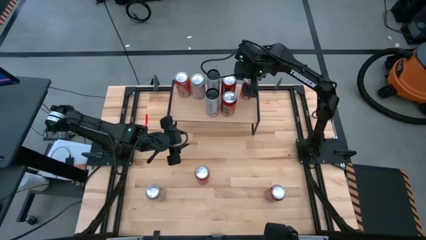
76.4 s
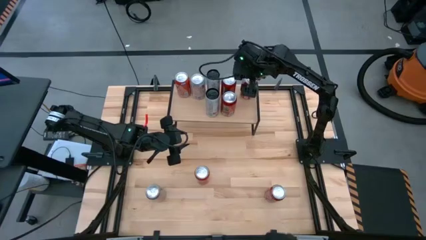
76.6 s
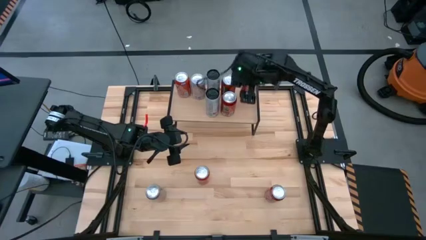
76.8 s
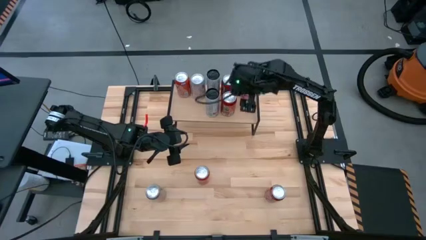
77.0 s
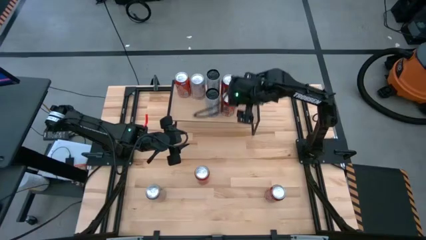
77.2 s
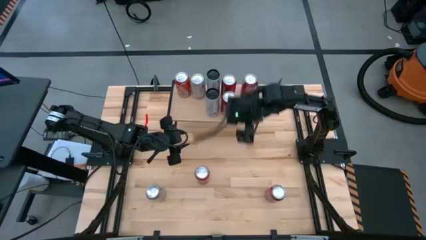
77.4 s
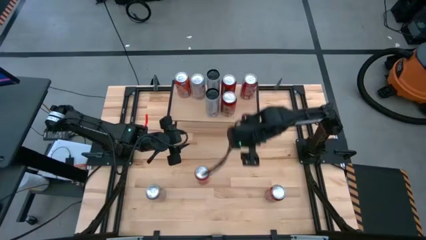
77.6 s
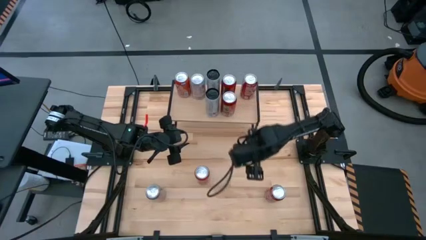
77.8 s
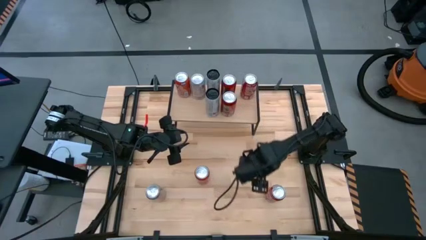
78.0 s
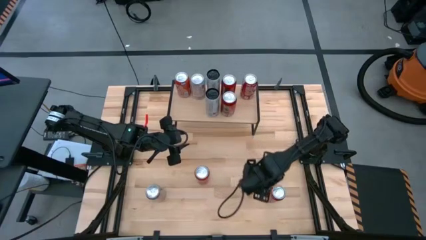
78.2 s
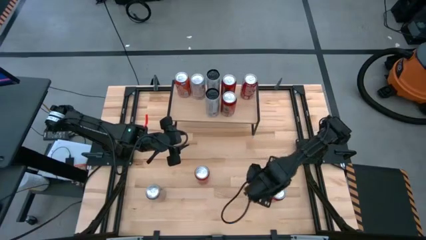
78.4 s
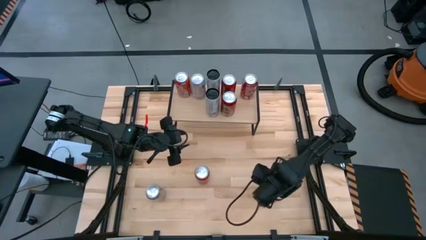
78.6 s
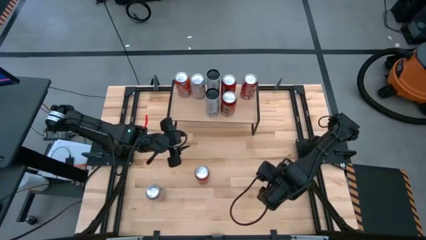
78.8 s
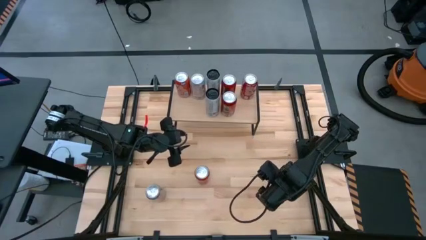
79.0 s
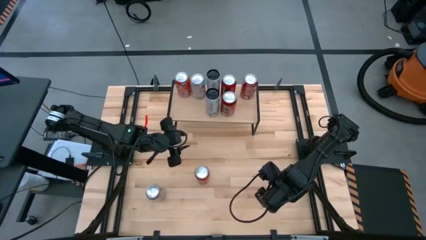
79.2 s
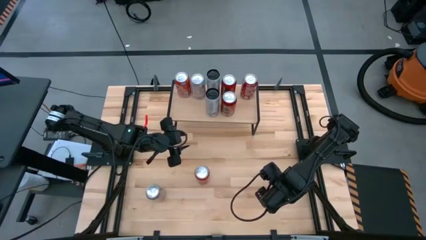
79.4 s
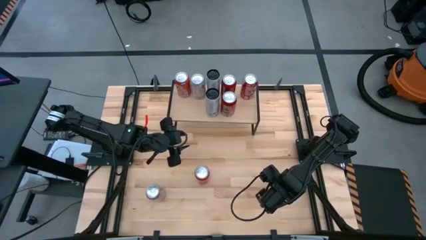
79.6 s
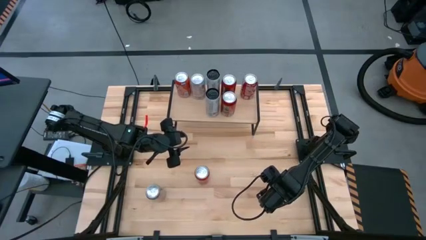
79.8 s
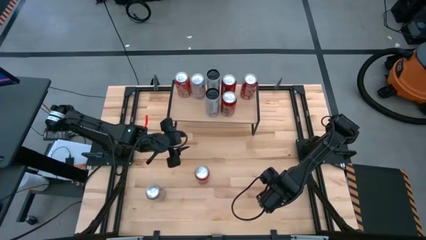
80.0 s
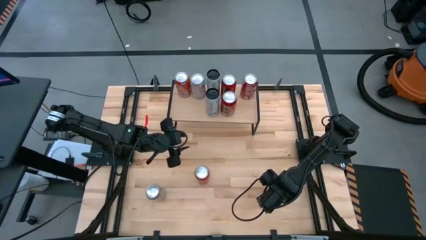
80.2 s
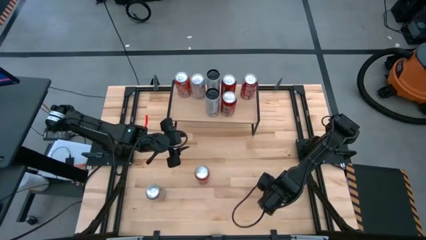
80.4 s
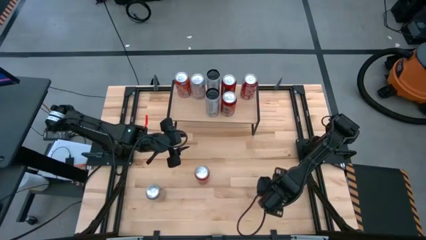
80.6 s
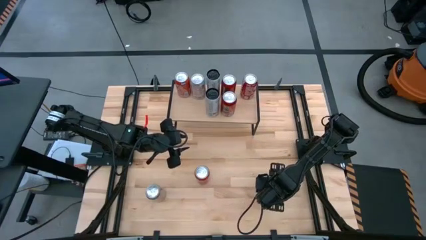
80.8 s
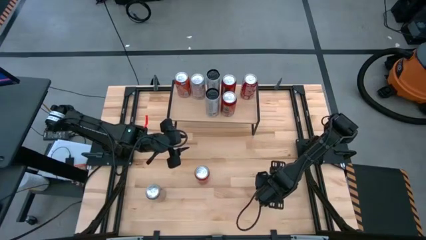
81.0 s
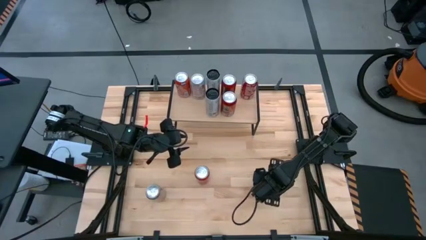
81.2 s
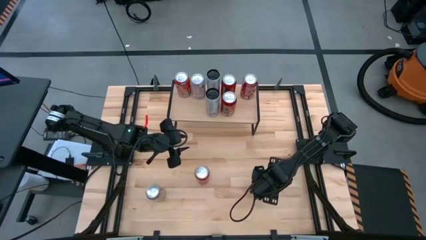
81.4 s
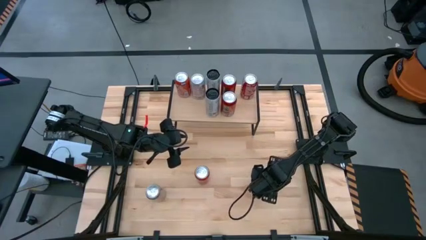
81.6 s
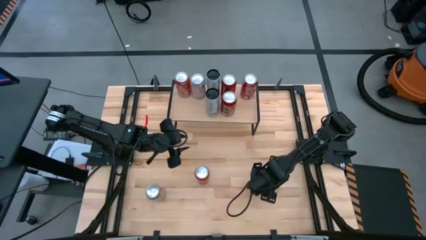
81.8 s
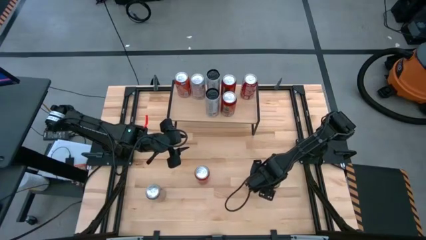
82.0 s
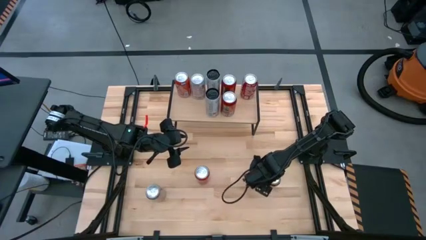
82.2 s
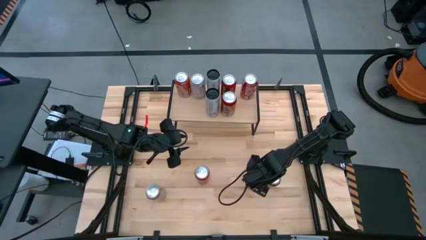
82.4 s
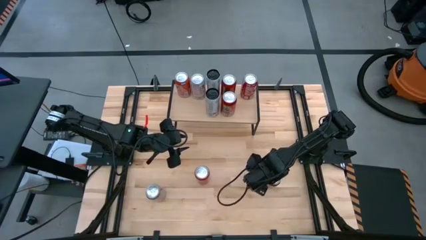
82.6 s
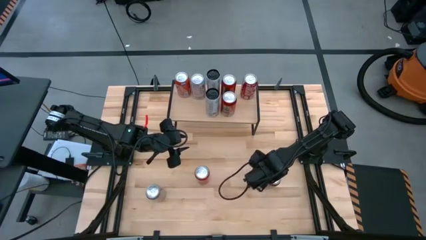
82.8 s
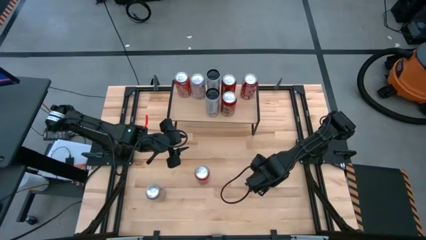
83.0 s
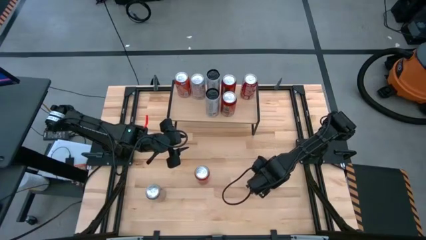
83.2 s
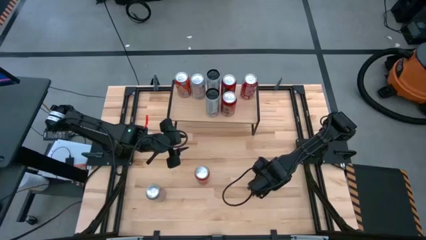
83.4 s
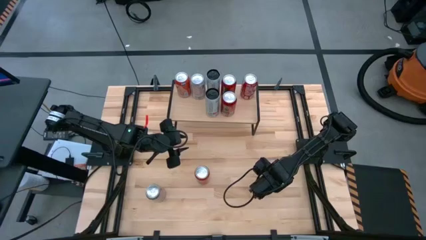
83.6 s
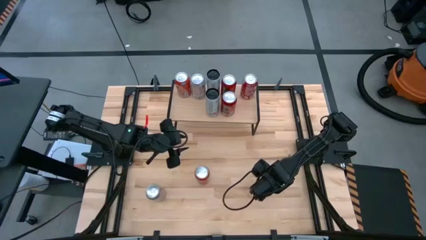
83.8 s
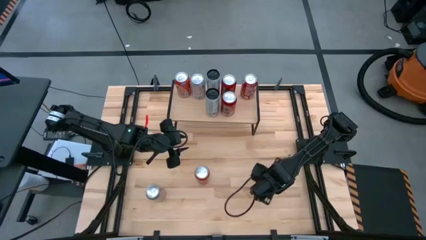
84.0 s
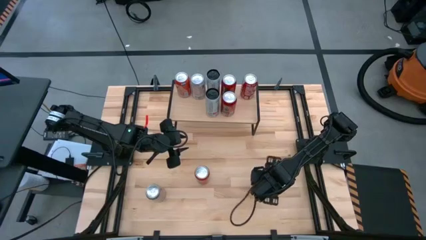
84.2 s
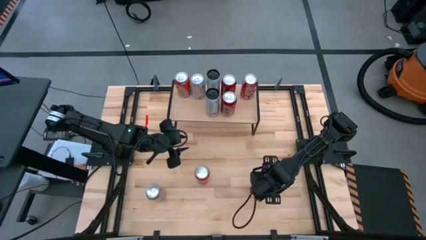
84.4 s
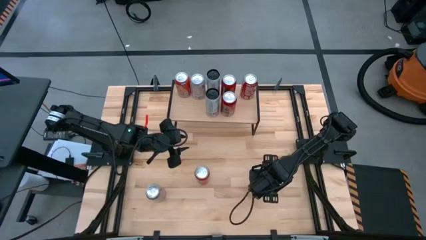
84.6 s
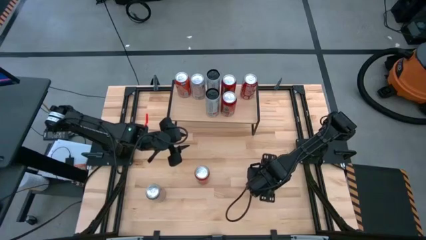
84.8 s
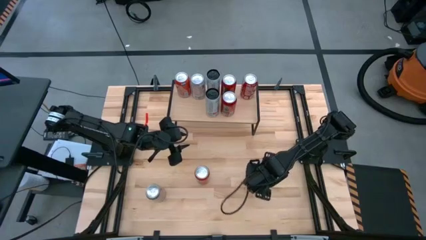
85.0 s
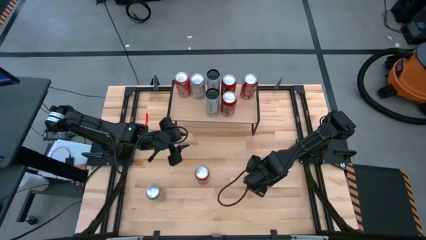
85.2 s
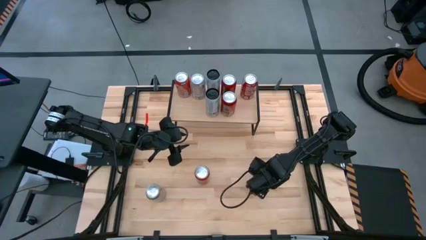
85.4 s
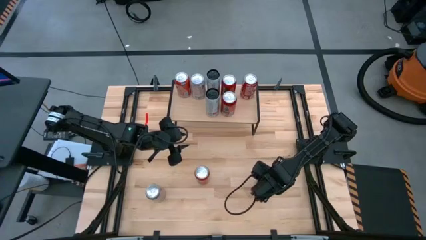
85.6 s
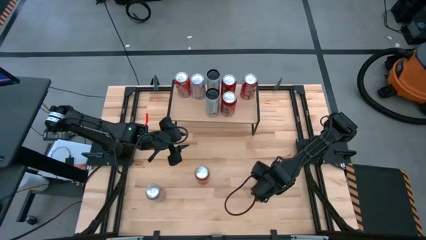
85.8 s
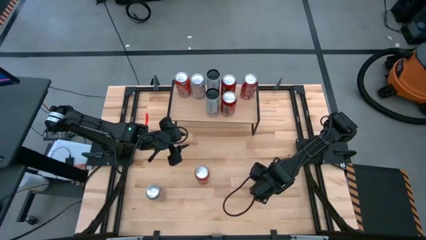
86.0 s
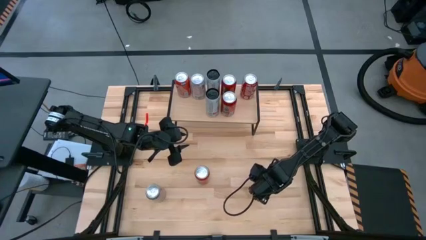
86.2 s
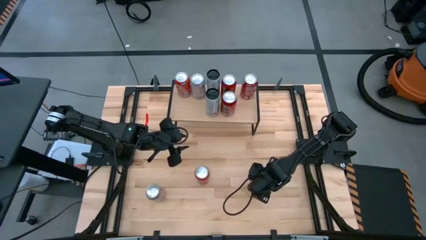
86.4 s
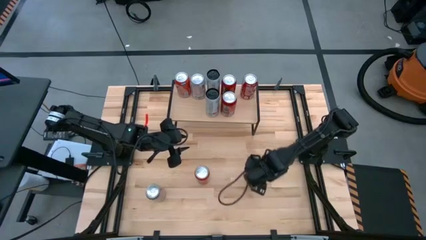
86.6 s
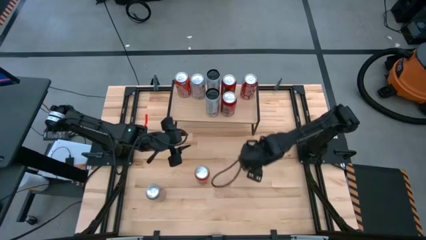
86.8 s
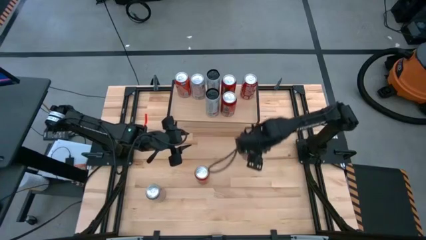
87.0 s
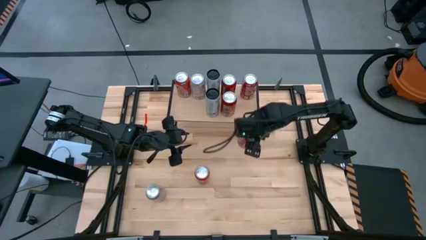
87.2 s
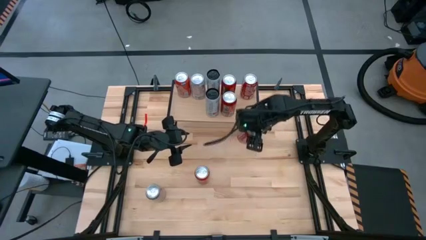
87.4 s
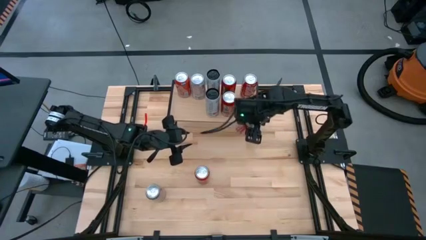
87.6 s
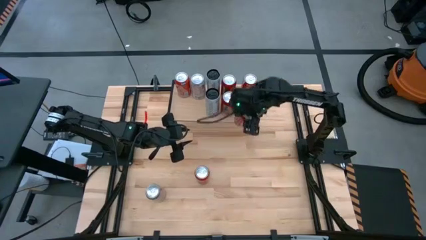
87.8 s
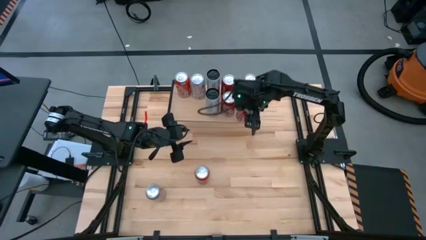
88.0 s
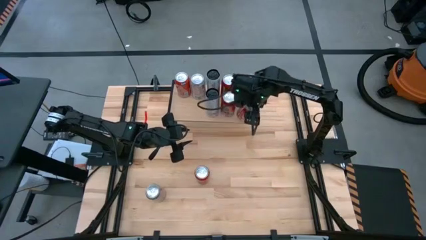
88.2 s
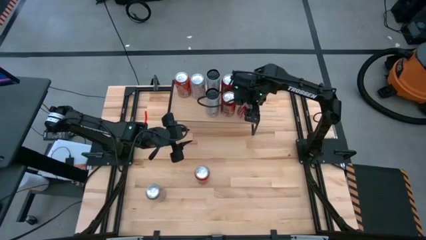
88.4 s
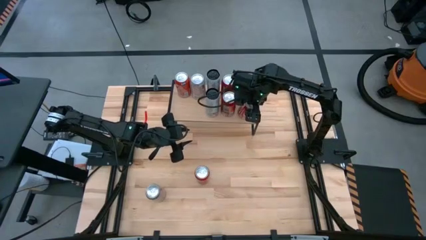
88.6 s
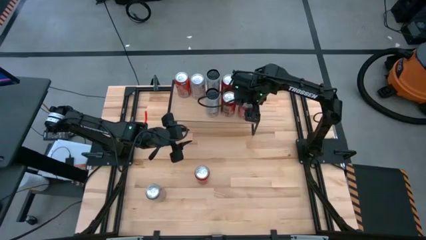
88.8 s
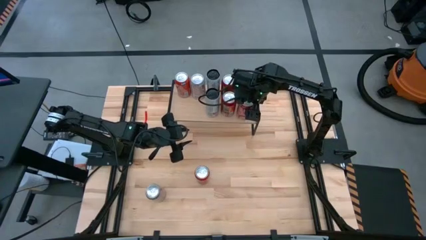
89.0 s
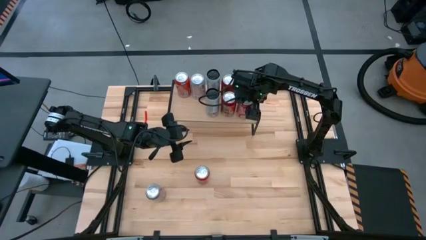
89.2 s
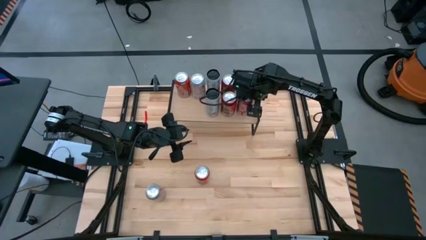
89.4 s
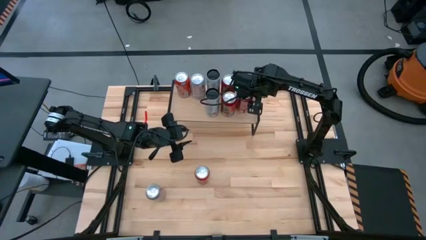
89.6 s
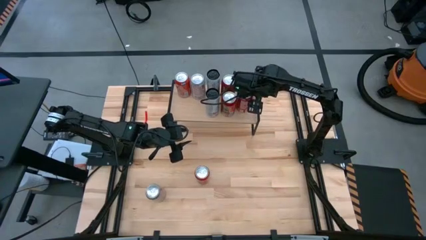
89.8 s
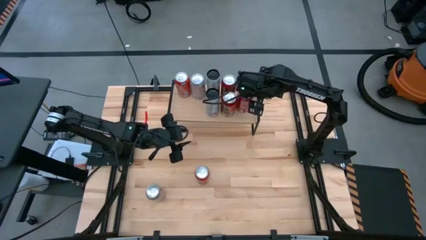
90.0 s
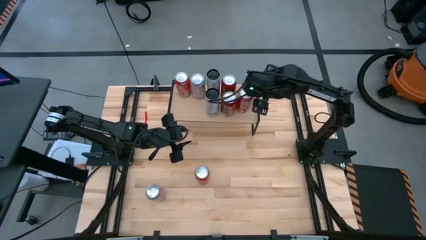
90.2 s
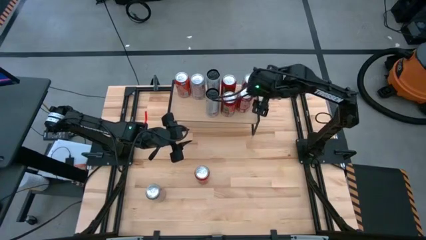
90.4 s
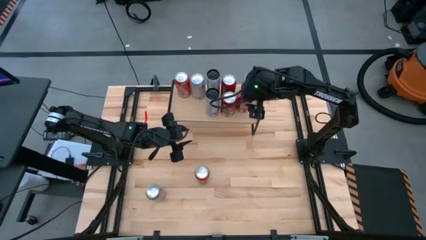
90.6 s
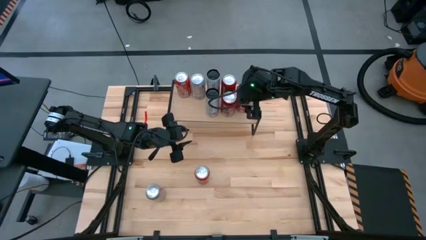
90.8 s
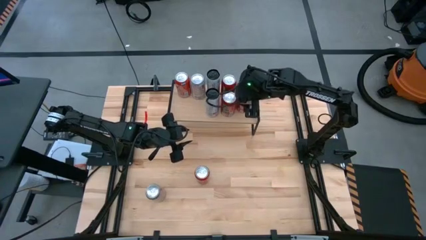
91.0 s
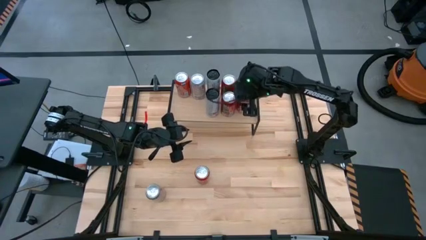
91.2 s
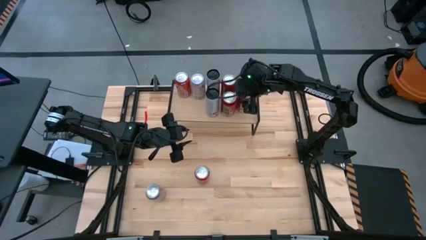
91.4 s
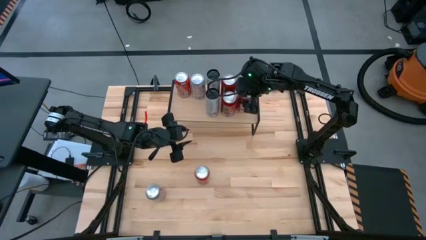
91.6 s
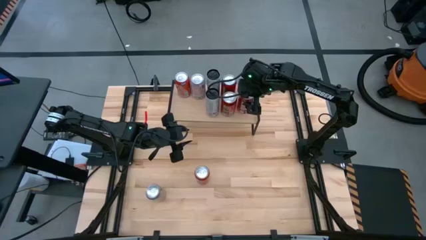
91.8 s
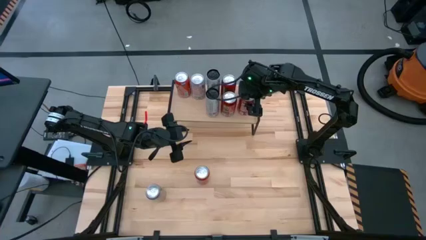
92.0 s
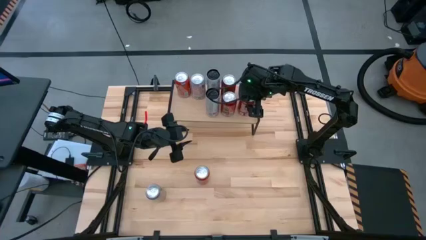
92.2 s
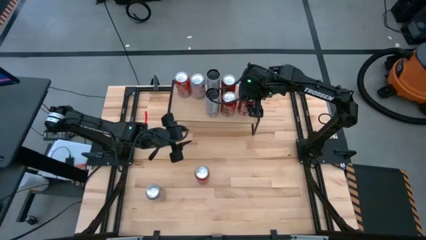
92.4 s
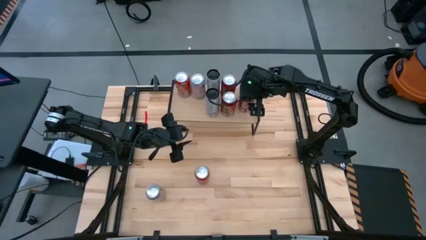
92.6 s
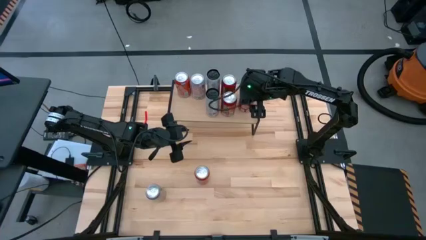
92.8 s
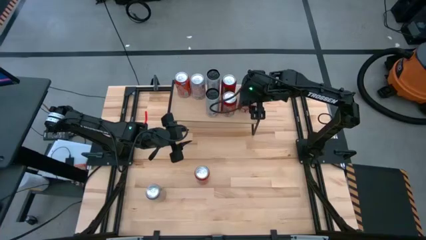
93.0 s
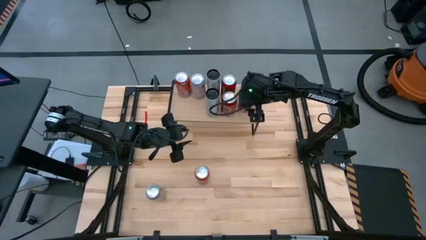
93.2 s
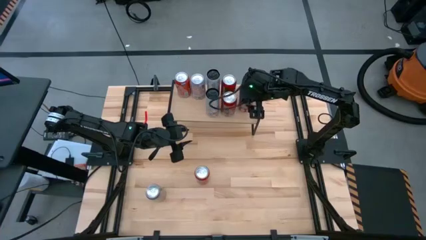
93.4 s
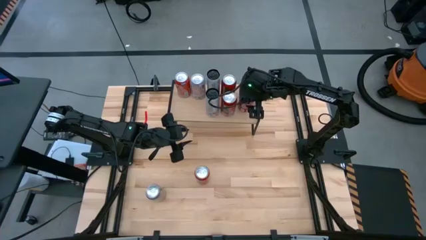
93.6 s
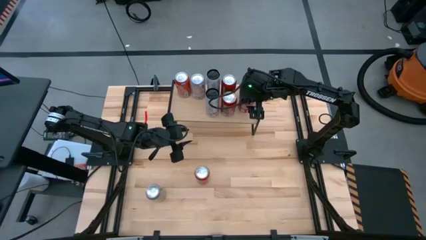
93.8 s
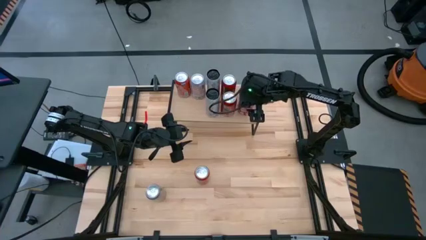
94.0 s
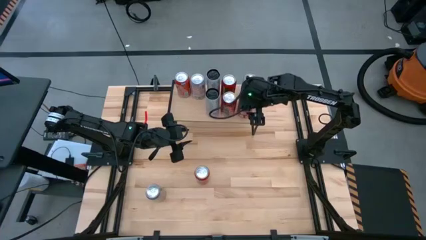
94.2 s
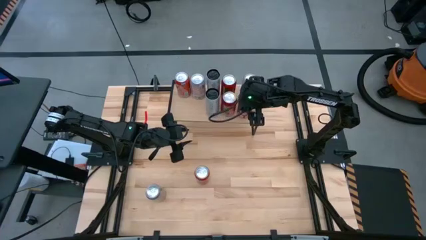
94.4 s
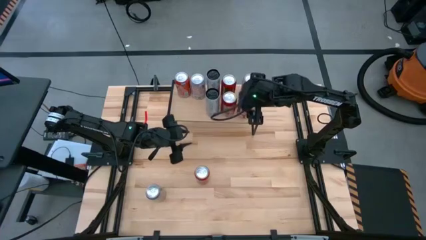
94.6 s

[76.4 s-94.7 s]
Task: Place canned beverage on shelf
Put the red and white soda can on the shelf
